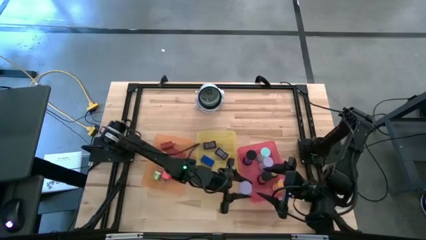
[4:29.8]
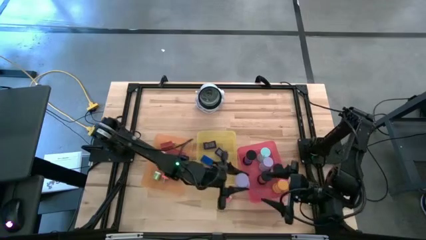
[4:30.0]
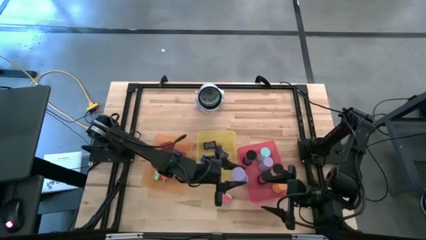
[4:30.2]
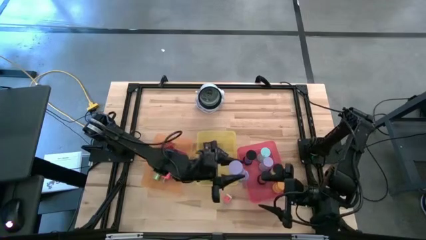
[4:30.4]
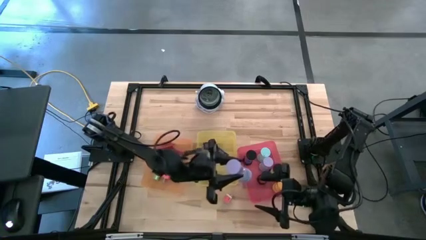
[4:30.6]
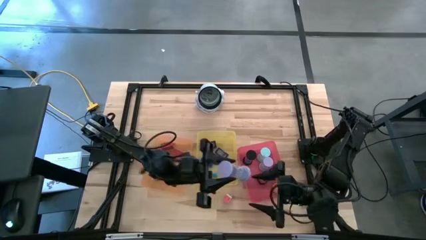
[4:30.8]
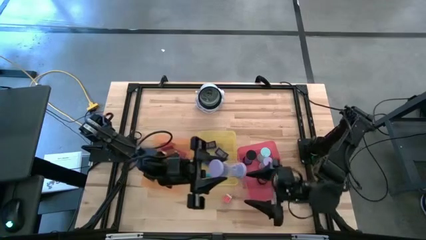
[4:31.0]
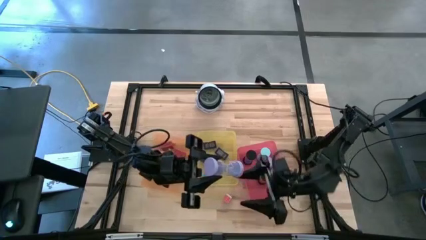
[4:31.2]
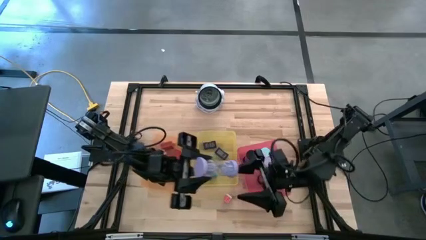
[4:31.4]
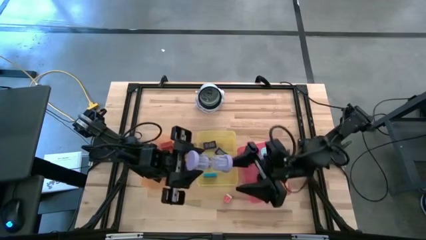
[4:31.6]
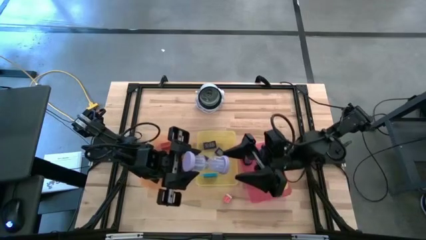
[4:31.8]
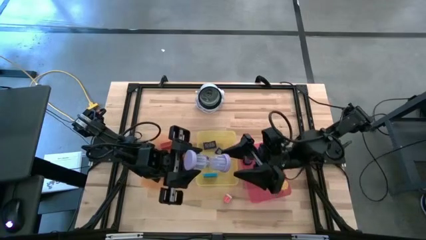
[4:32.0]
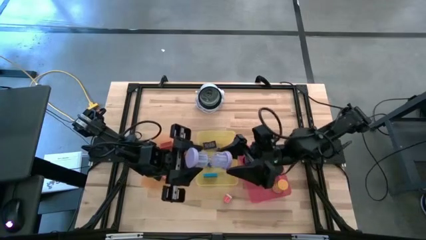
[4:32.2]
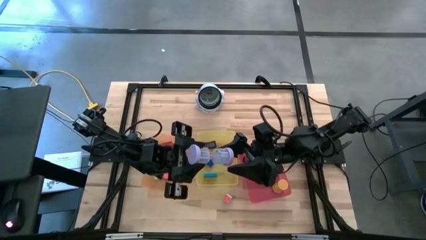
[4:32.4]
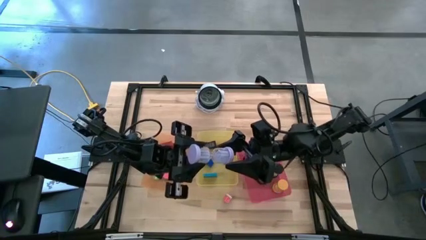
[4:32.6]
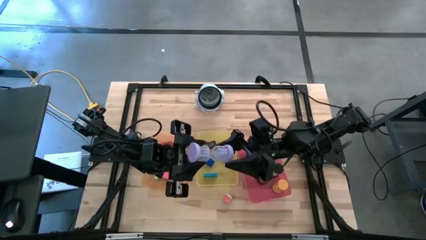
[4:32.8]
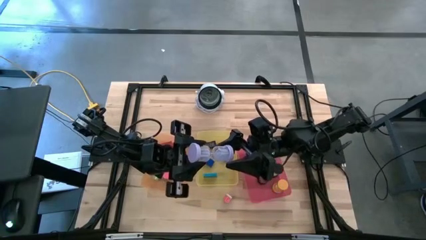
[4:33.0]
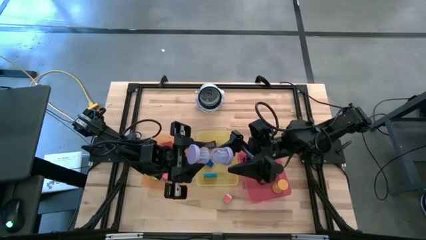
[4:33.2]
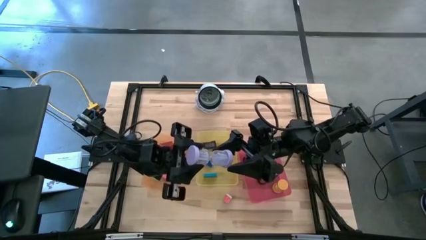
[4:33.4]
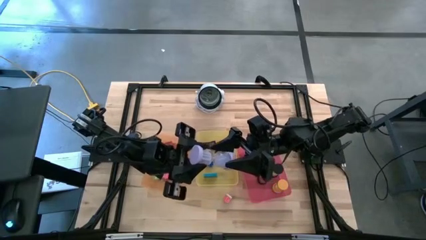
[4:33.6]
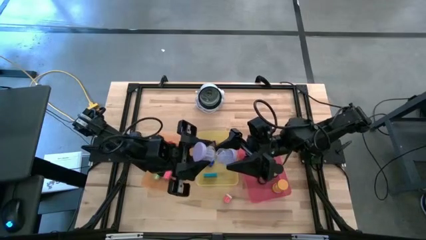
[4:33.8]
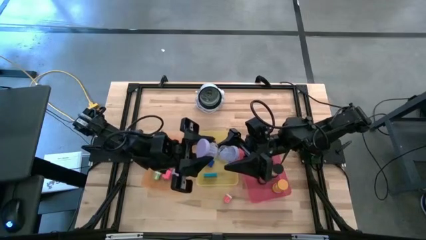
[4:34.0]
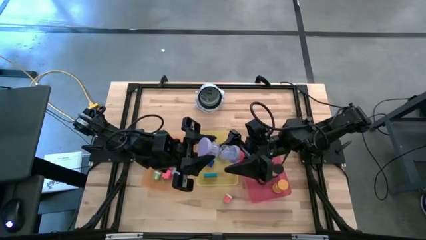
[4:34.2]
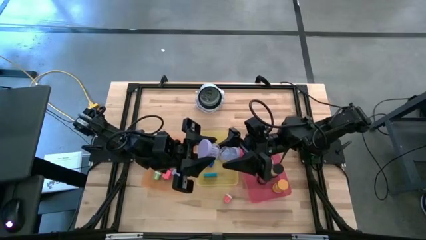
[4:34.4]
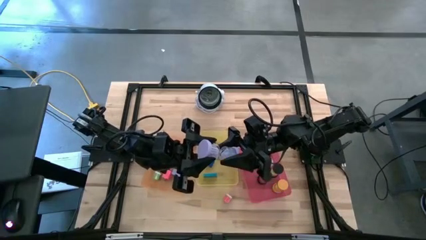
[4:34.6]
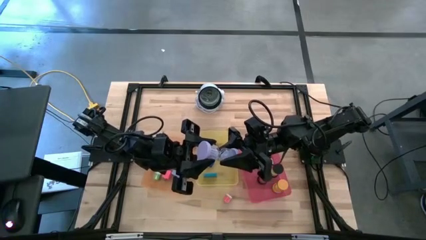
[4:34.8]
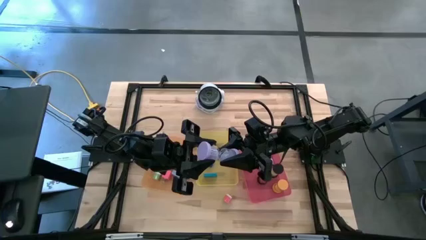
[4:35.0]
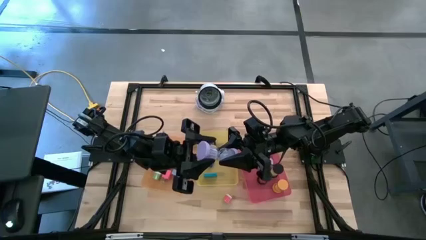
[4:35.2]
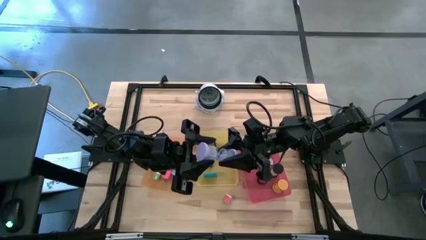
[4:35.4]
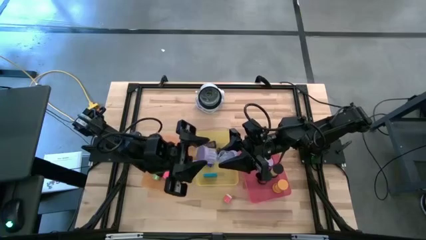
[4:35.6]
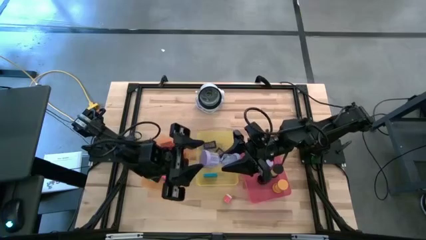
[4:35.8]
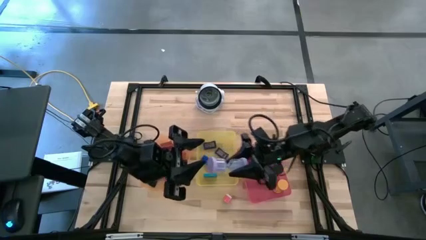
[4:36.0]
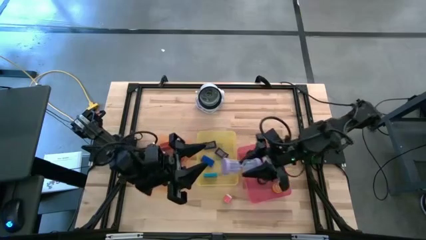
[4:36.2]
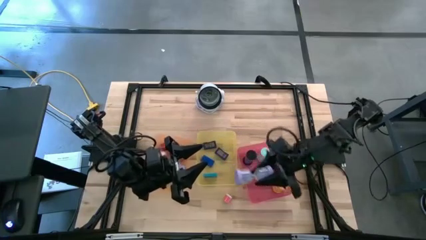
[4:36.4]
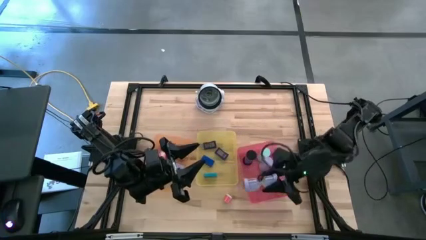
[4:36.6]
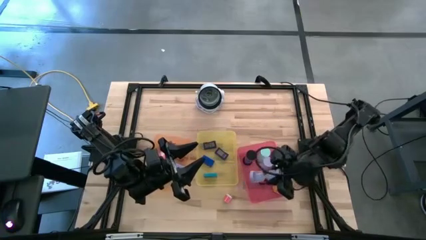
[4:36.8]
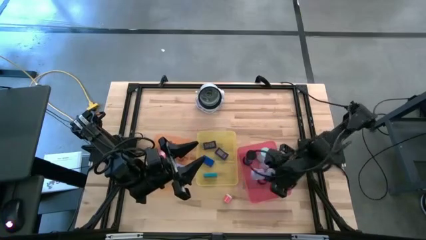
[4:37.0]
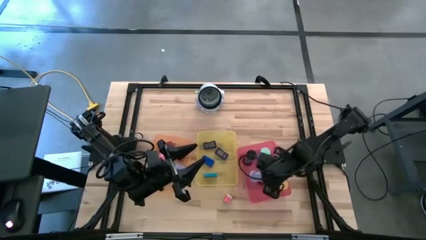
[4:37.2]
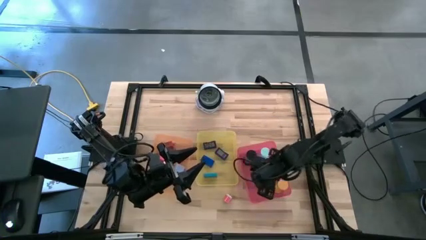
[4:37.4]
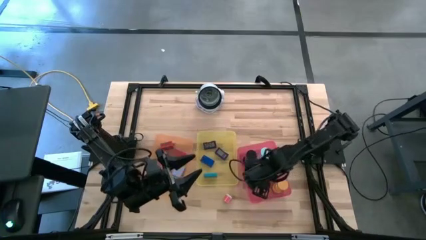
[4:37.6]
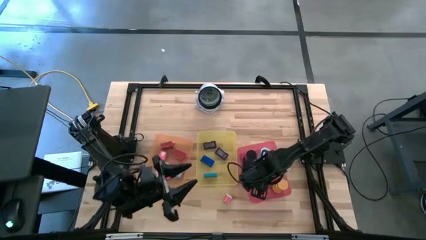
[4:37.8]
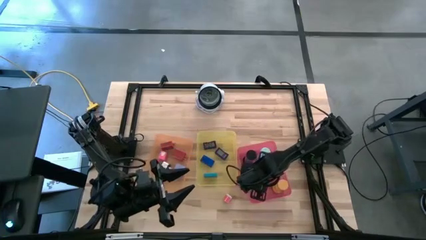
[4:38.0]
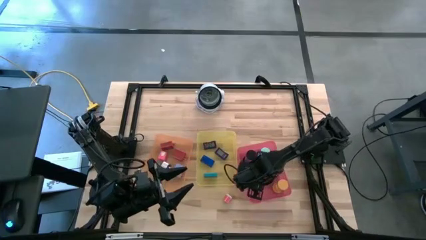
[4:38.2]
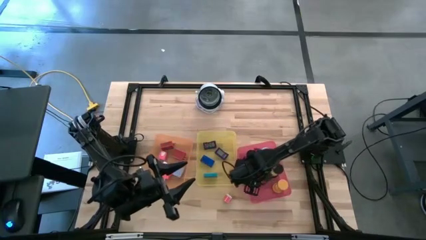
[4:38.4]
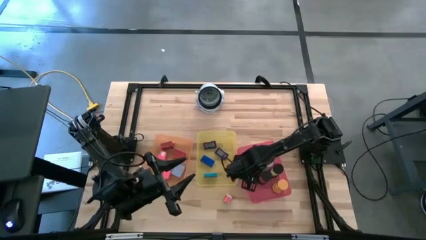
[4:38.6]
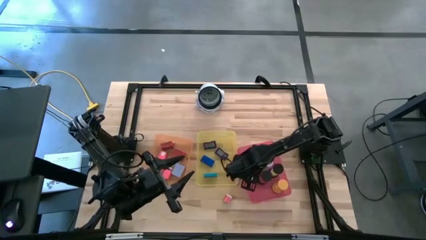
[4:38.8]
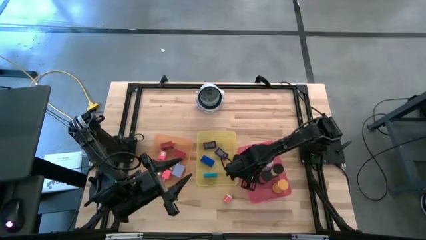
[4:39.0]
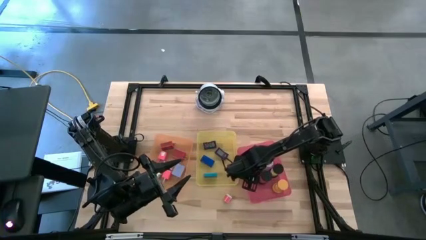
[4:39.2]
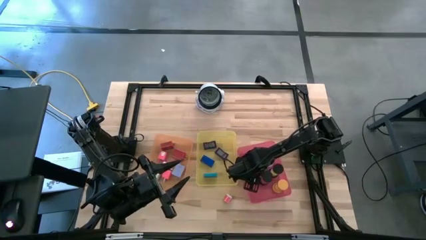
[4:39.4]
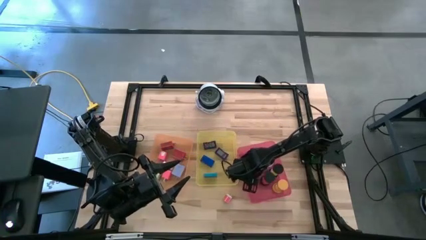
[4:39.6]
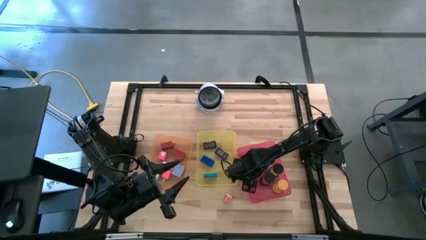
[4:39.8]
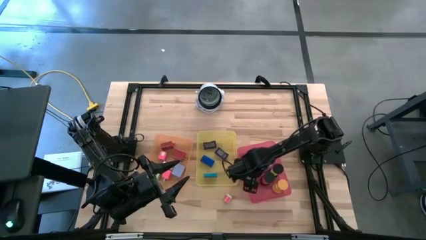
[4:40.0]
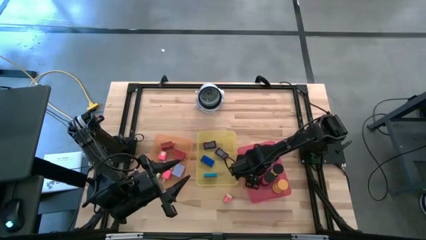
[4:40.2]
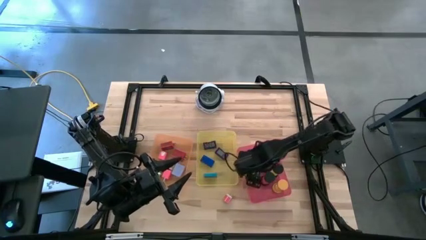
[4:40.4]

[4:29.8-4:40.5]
Task: Pick & Place Office items
Put the white hourglass timer into the red bin
